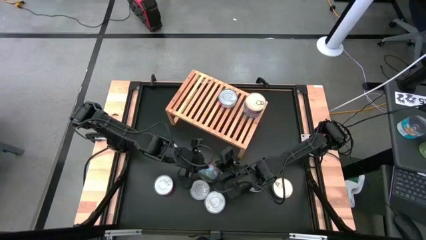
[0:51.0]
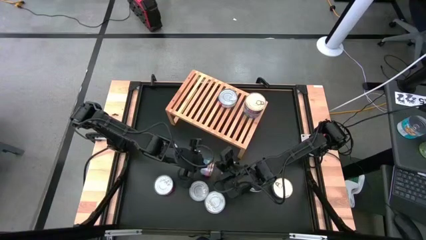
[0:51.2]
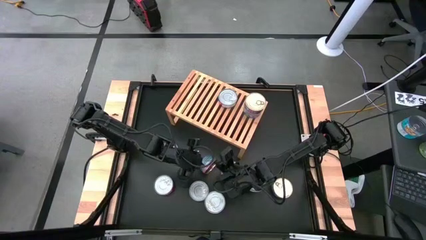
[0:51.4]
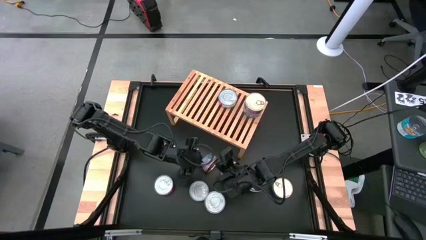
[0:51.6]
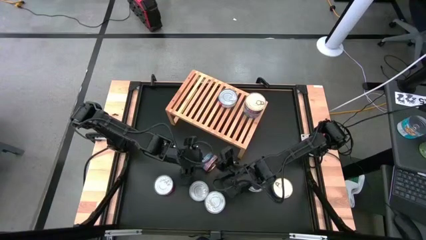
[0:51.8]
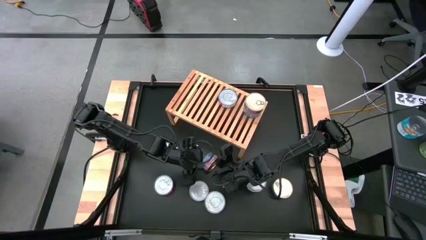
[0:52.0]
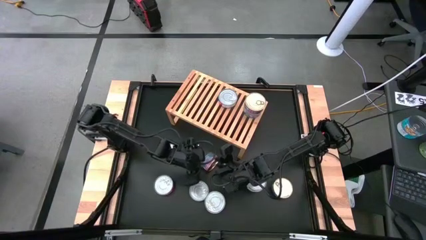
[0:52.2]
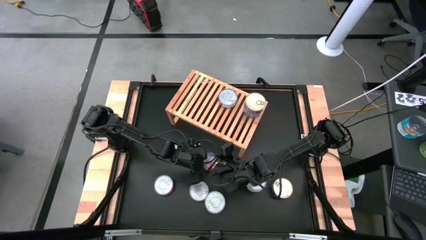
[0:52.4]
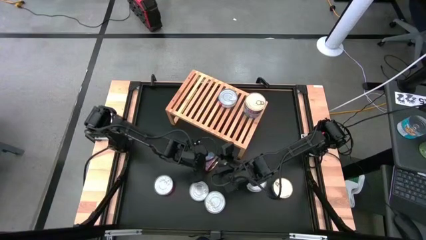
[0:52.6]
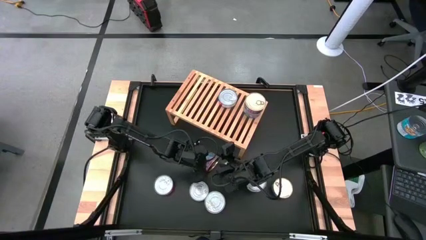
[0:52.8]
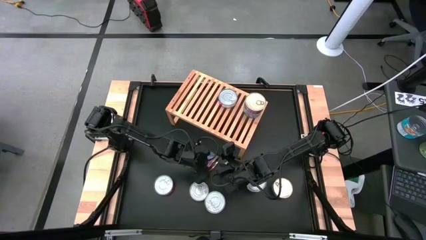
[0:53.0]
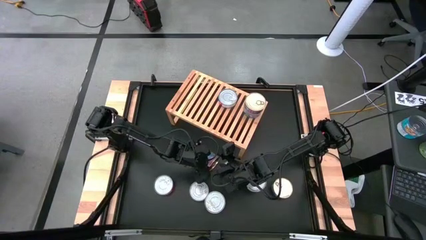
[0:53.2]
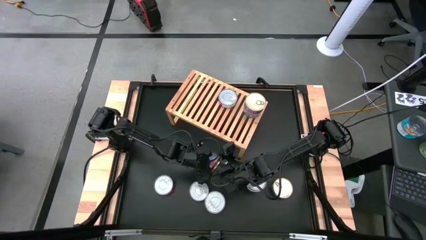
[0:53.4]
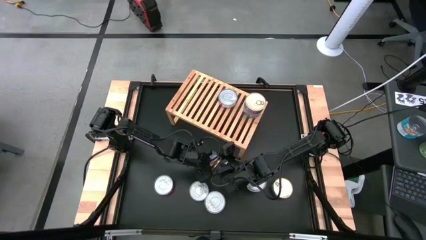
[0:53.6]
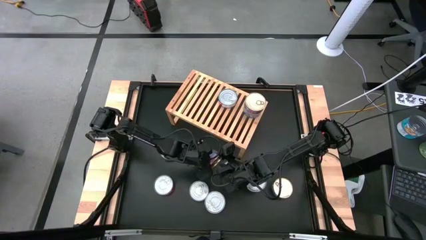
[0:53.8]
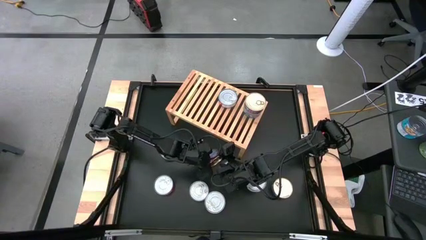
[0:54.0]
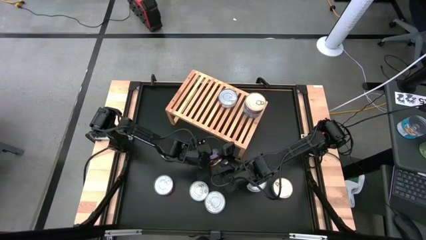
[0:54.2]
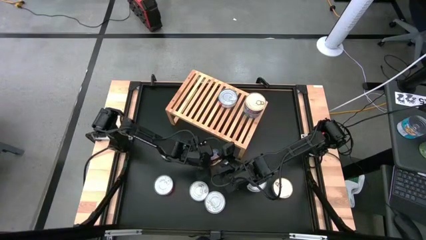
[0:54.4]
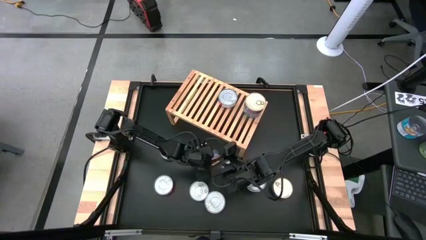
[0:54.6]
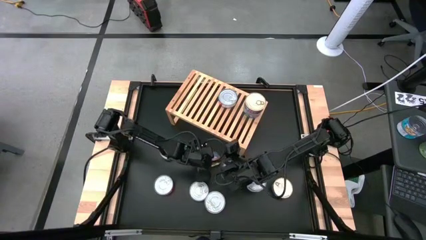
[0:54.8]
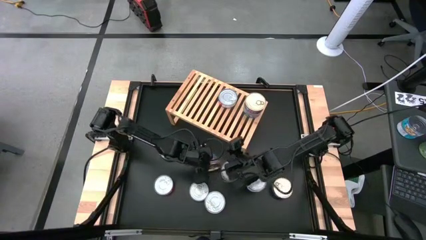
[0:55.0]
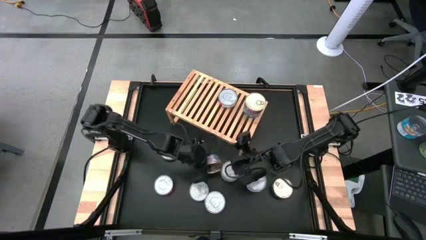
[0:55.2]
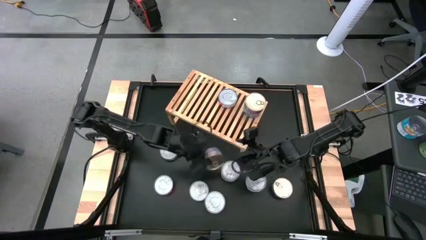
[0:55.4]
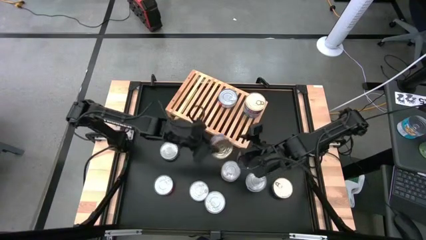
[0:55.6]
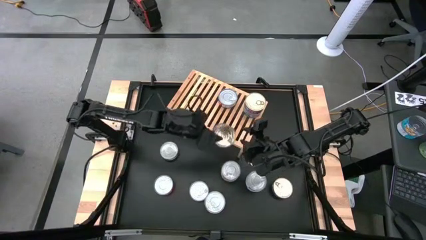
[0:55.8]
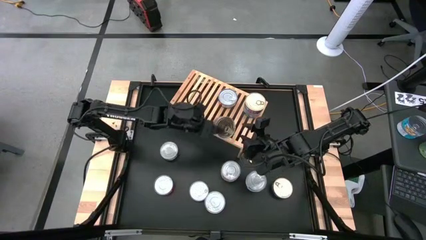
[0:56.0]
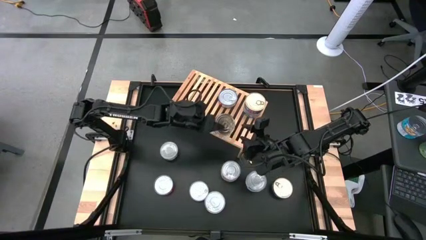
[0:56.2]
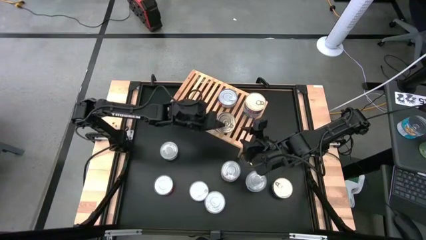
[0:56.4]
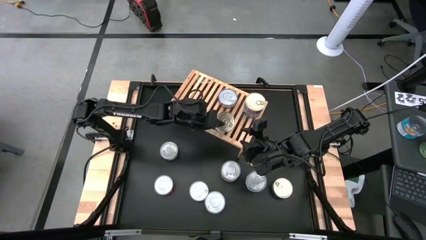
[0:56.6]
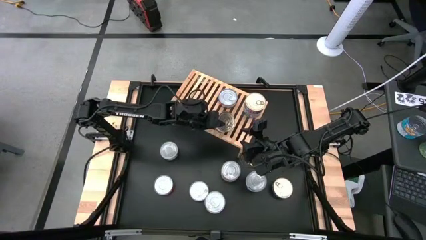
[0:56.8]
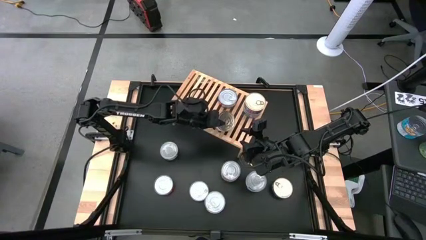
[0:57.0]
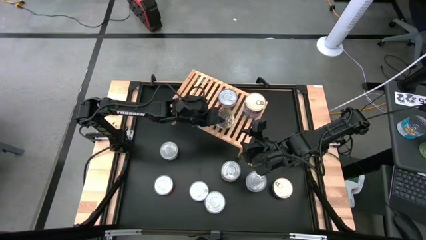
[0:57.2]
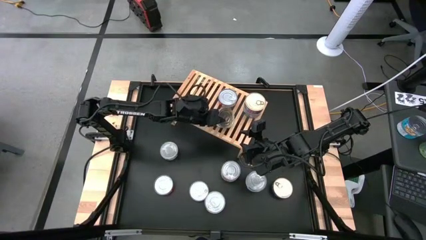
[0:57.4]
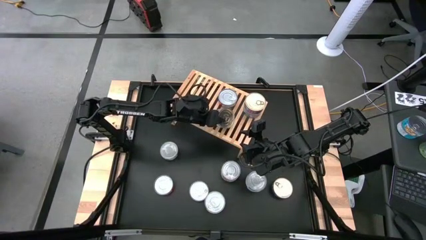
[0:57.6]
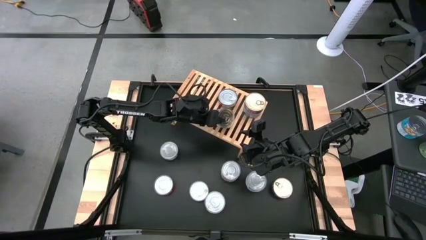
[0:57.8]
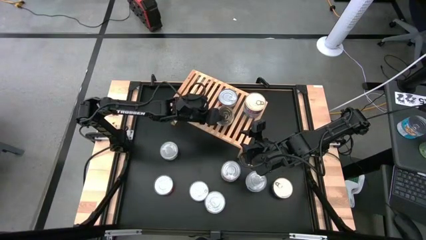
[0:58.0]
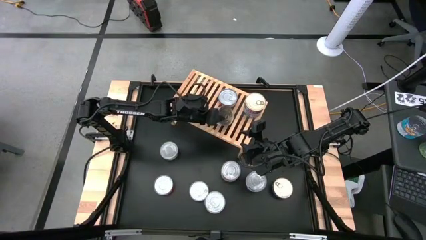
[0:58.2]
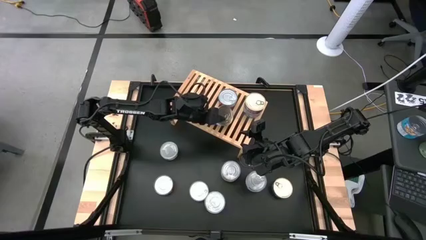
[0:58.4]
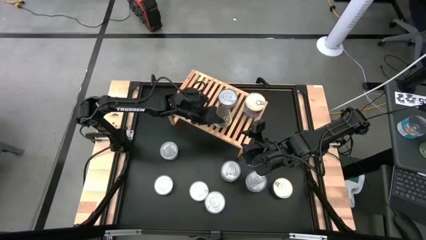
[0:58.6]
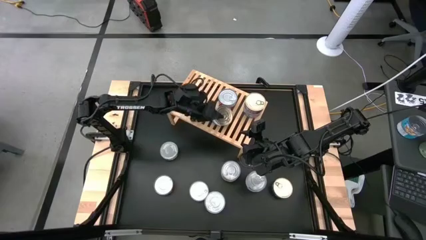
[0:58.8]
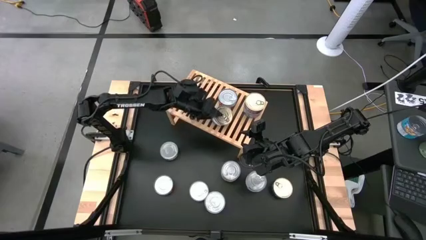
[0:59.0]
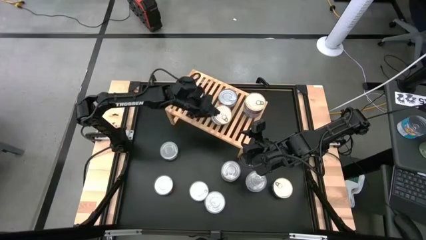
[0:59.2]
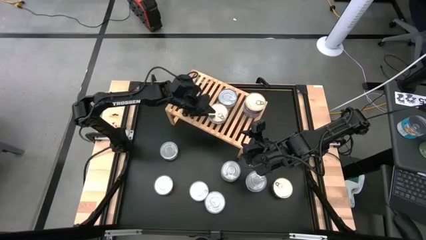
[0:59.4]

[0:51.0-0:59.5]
Task: Stack canned seafood by type on shelf
Put the blue and pink tuna can aligne white the other blue and pink tuna can on the shelf

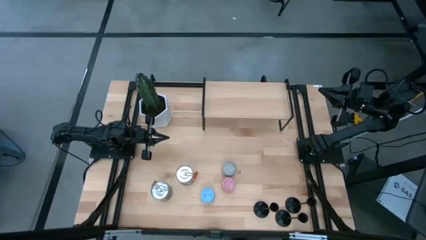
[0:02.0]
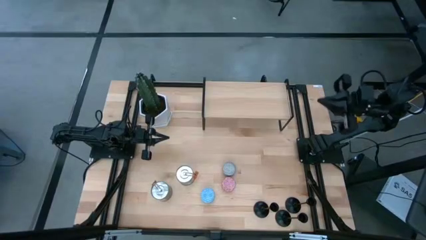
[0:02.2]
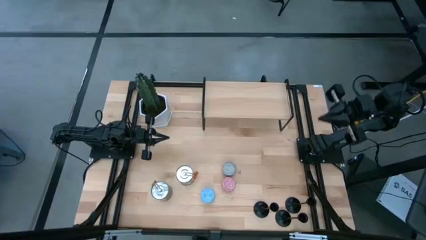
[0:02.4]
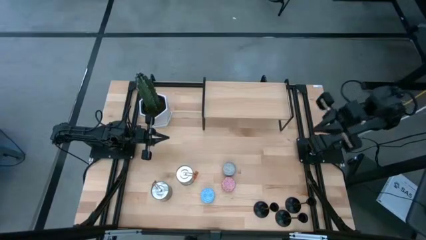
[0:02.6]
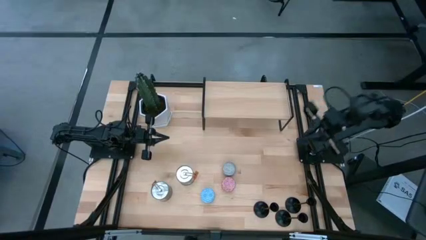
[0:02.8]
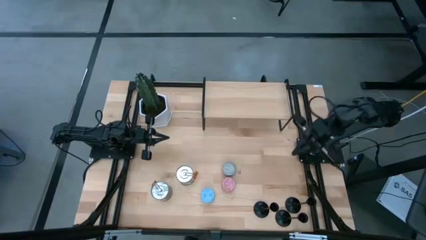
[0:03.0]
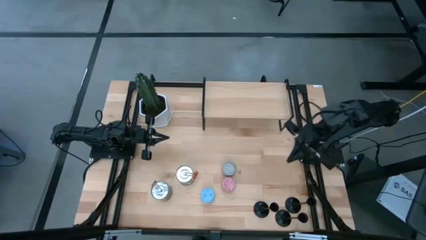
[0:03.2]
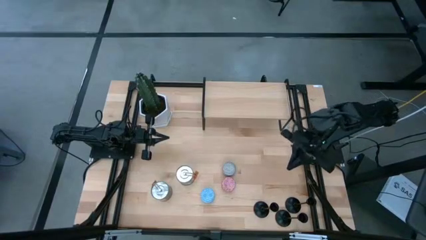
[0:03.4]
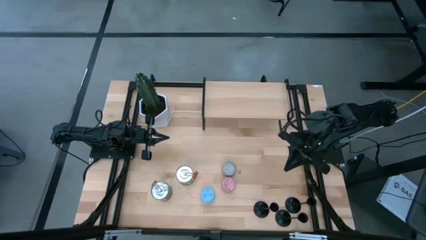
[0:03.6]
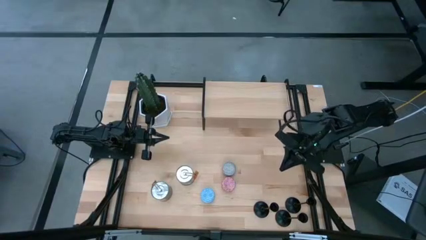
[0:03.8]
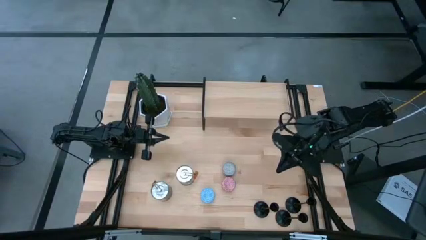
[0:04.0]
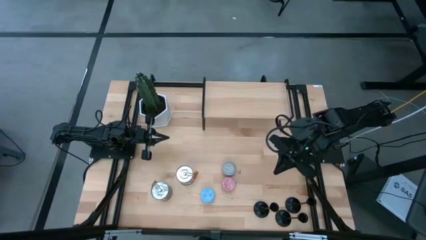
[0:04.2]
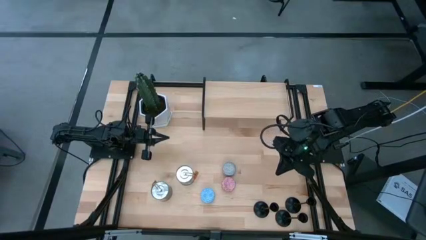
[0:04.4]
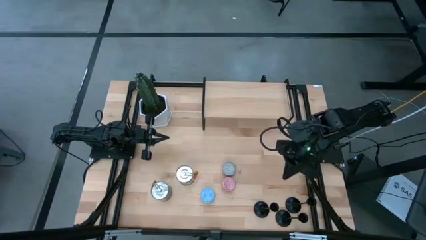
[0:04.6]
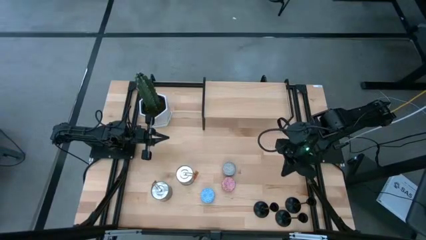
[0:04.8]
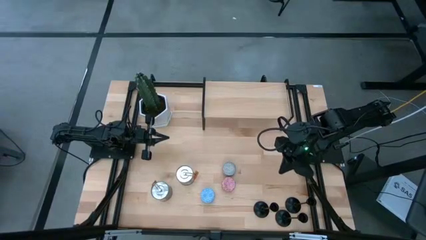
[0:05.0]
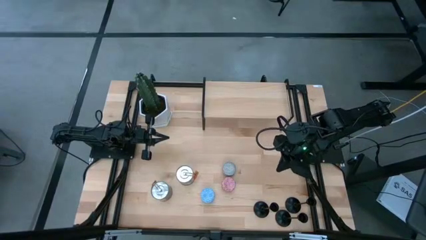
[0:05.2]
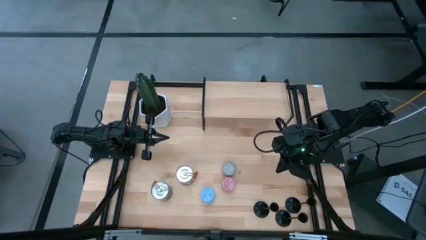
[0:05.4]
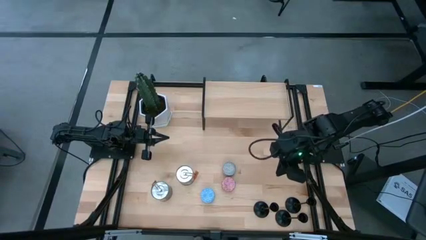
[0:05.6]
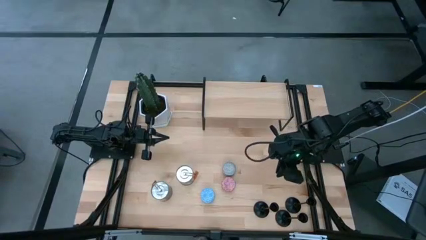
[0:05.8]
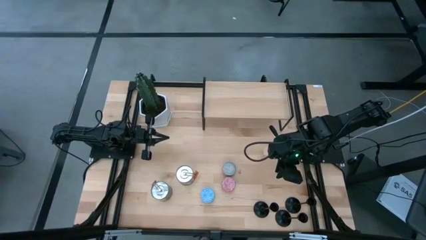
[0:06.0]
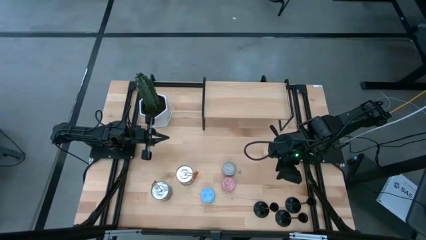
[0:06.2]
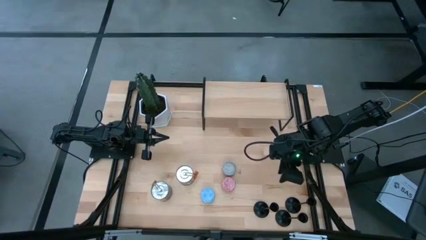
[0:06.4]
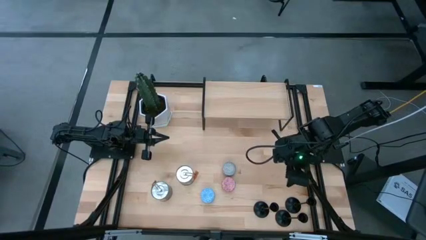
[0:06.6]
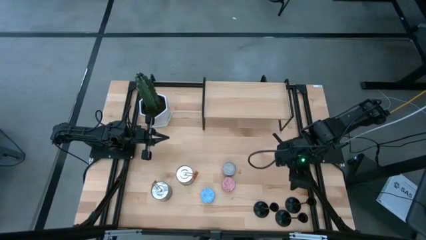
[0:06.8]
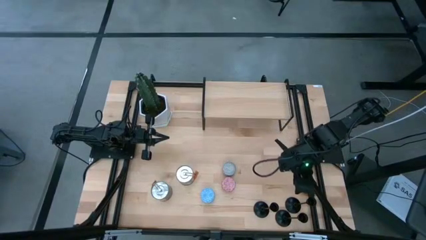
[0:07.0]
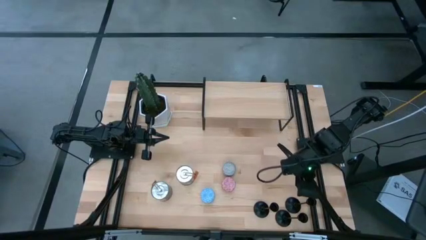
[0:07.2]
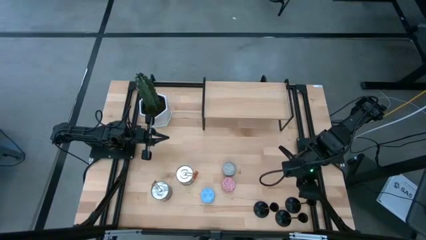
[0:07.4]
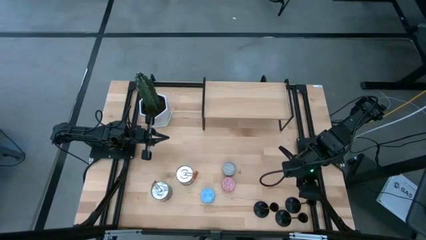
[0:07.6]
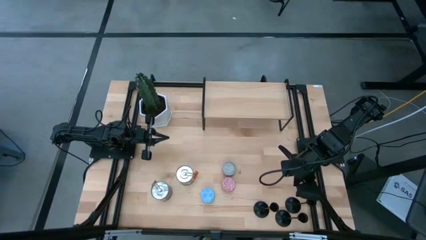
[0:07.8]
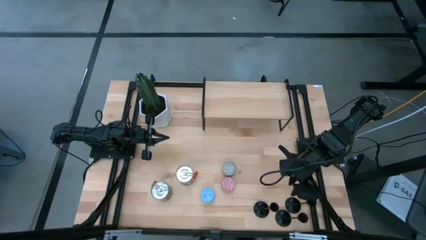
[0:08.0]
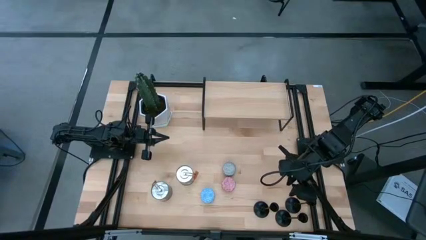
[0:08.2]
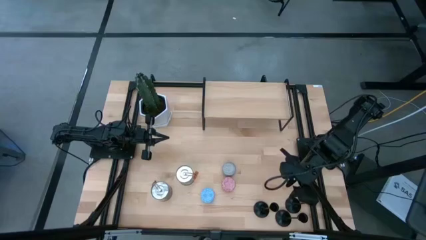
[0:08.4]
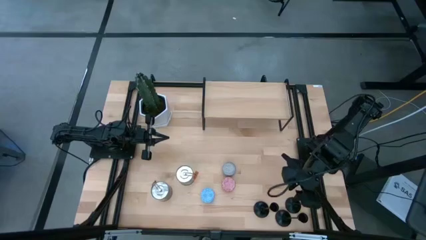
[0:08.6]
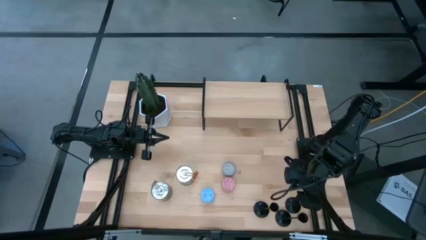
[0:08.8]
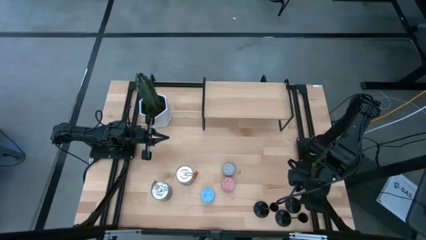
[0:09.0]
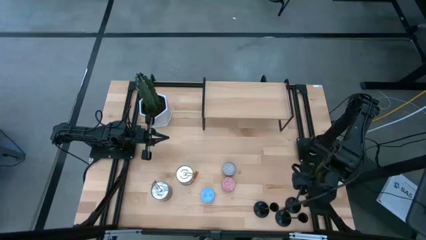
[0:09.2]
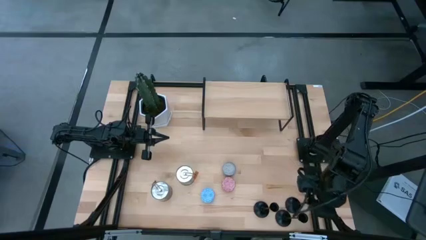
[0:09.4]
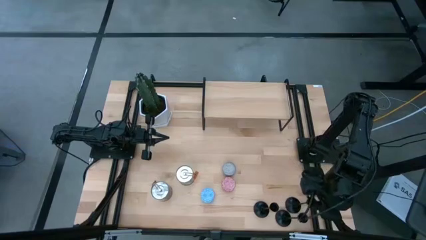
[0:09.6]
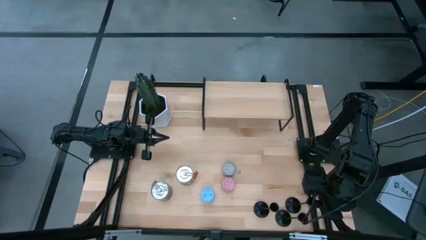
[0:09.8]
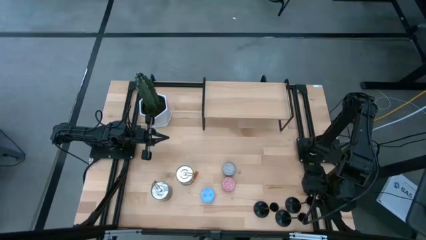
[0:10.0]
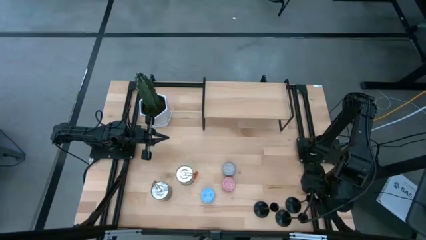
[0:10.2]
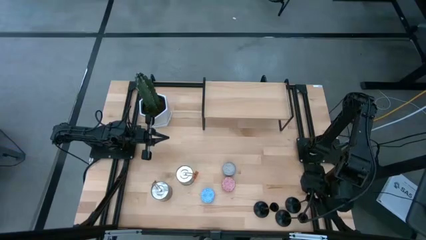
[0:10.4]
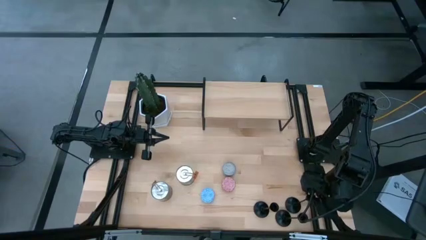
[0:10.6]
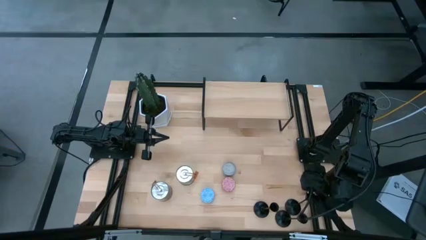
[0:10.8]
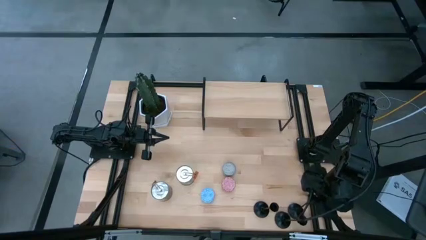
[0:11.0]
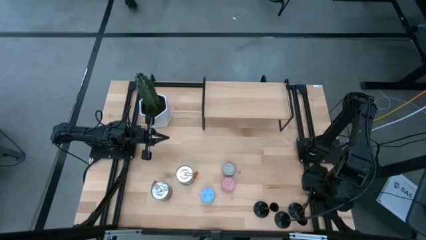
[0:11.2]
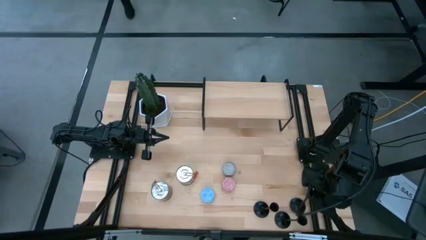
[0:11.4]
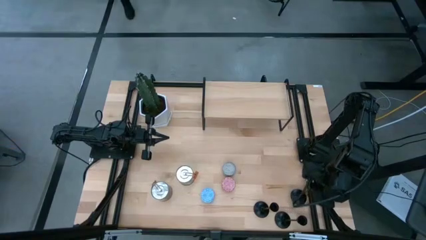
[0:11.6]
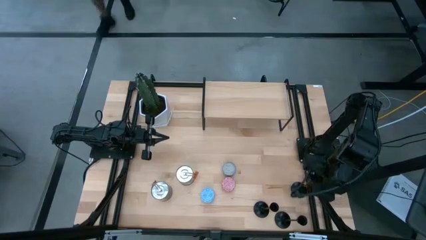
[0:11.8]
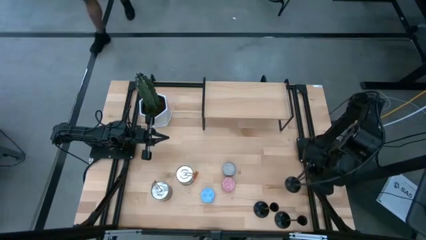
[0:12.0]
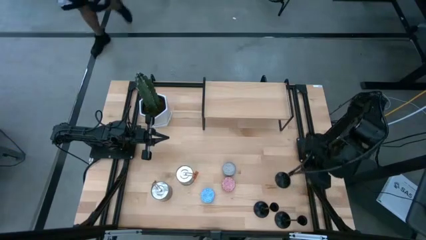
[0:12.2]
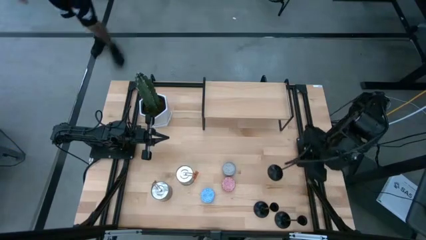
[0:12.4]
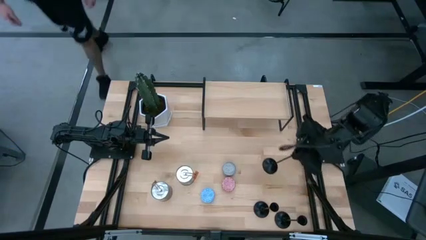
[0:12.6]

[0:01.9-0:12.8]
Task: Pick & Place candle stick holders
Put the right black candle holder on the shelf
